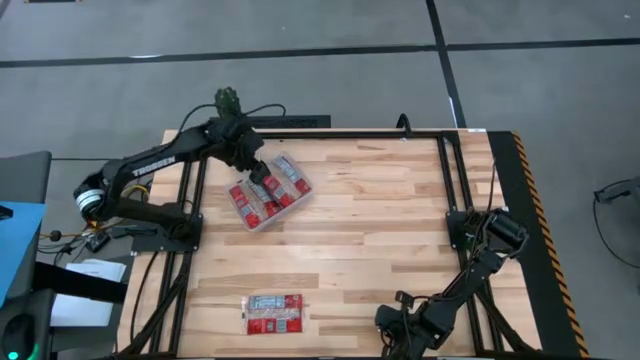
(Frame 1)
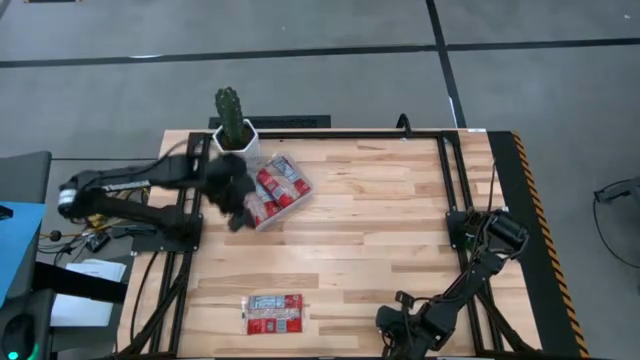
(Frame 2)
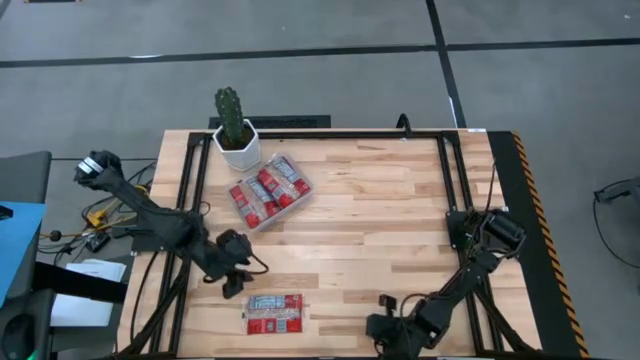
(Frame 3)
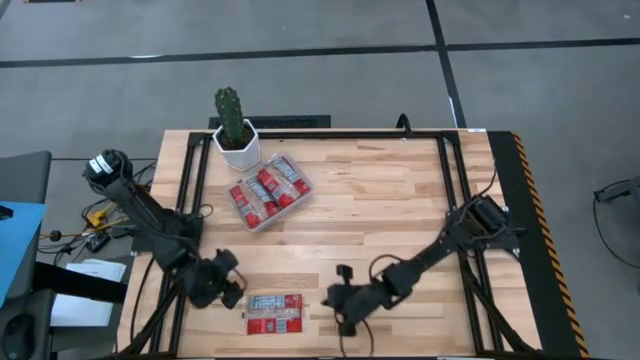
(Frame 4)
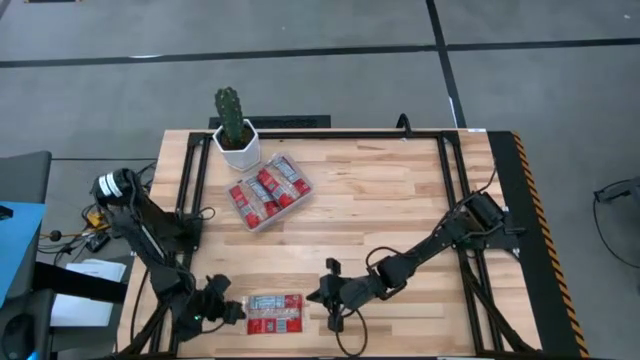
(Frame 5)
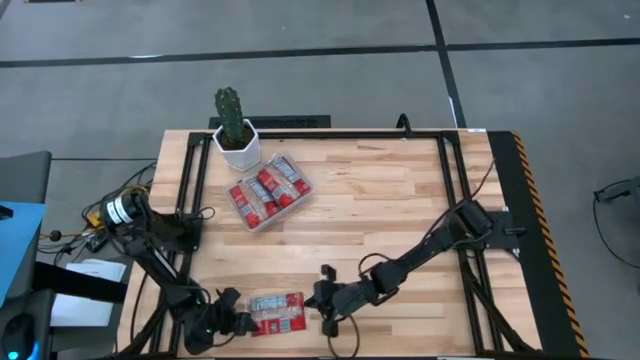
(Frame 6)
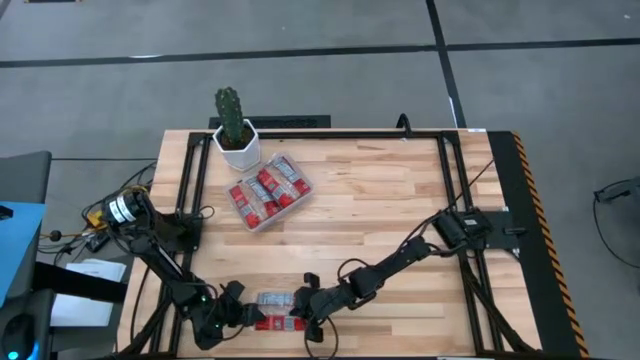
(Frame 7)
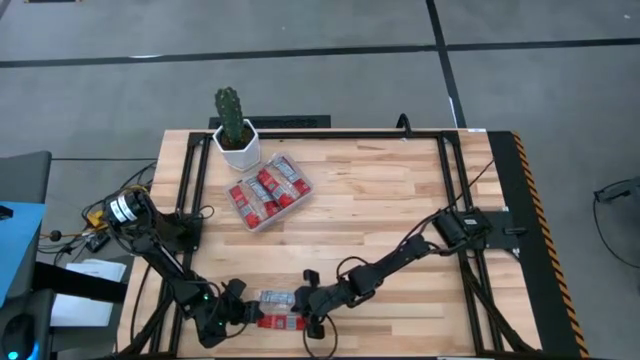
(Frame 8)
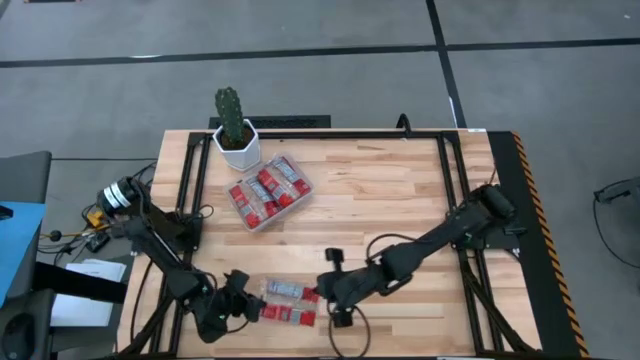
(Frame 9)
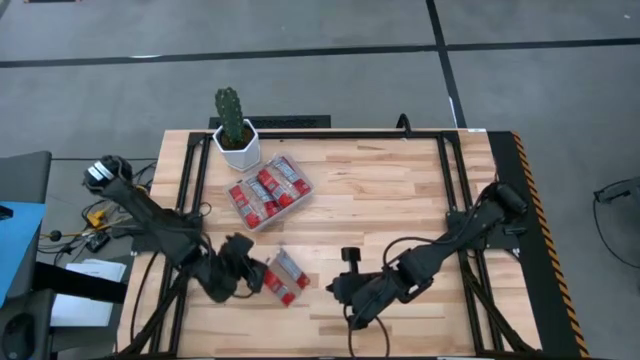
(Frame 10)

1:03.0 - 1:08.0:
Task: Sort popcorn bags into baskets
Put the red popcorn bag into the transparent bin

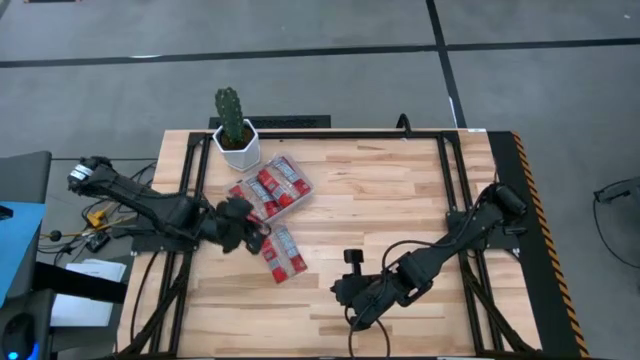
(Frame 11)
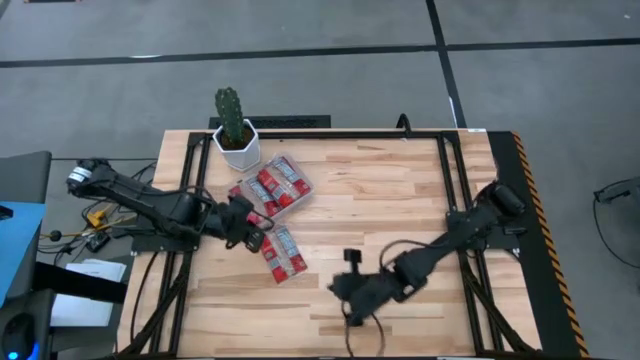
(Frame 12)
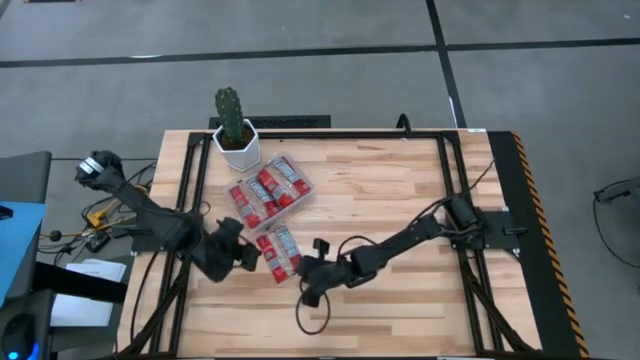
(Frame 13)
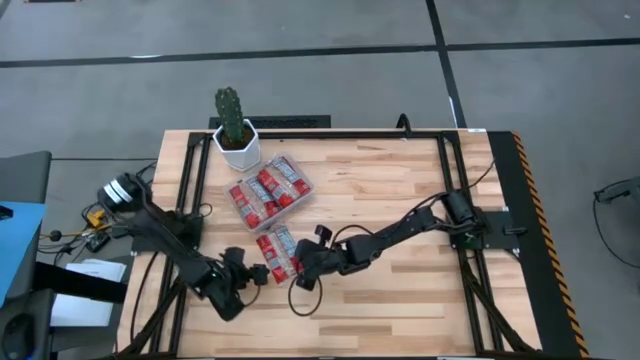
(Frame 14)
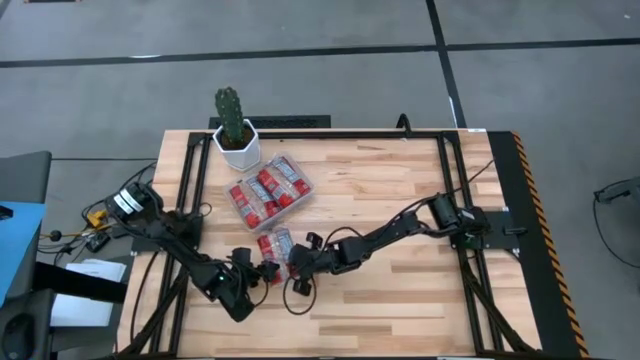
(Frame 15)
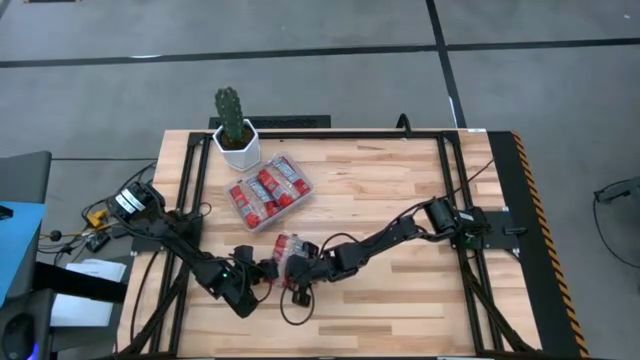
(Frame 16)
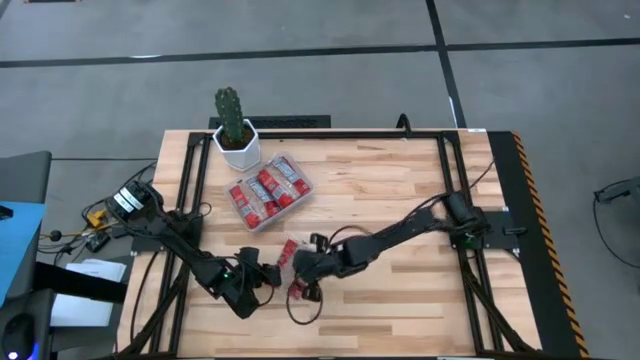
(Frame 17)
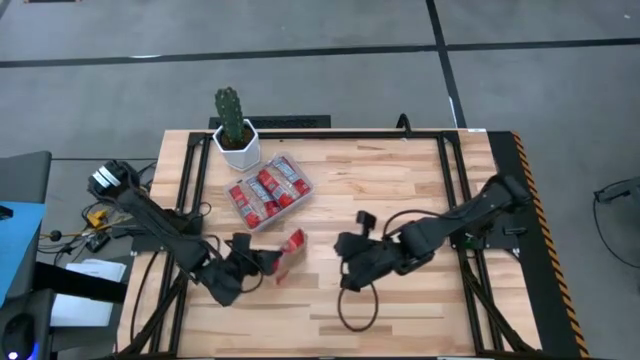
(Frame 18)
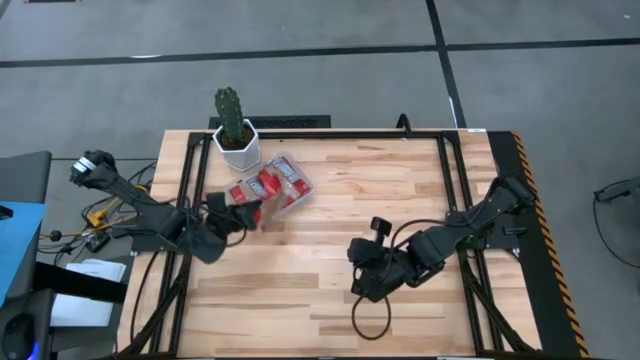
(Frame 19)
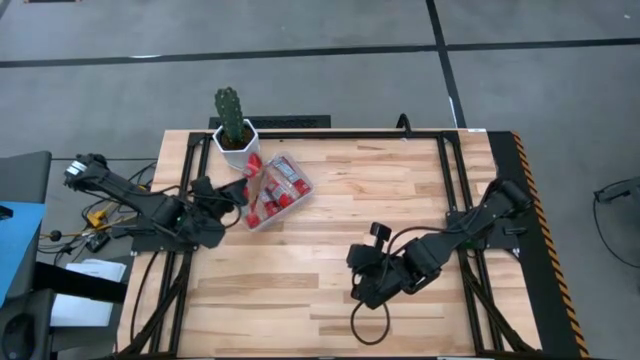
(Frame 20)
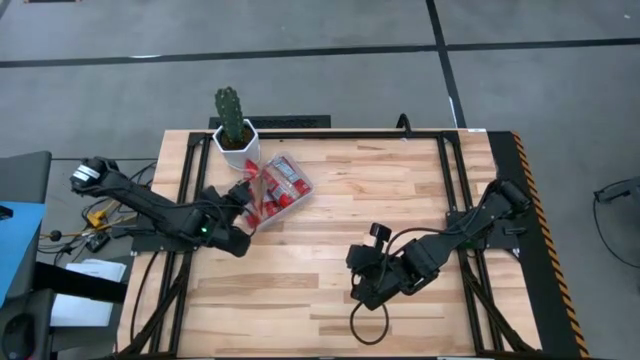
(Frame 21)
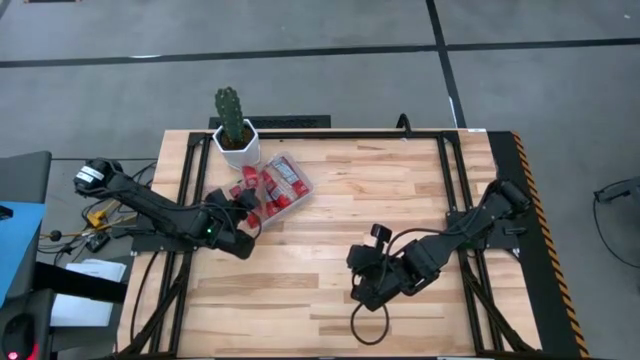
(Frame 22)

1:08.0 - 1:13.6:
Put the red popcorn bag into the transparent bin

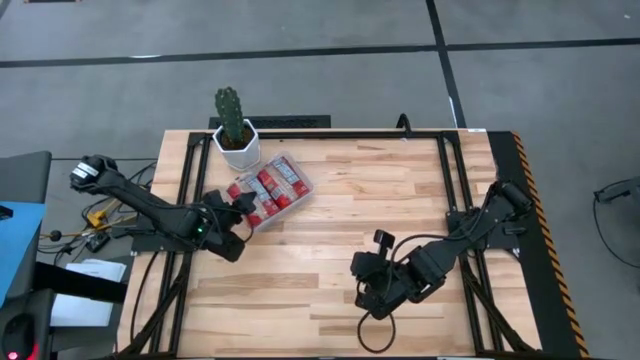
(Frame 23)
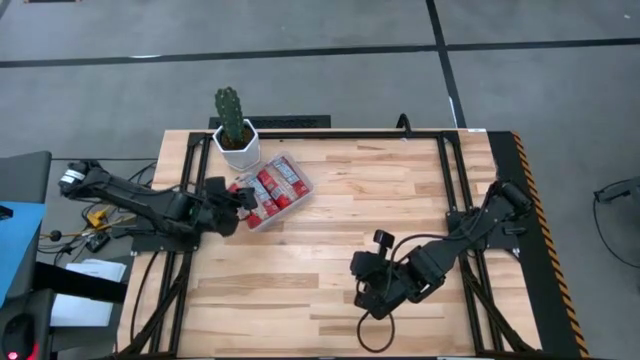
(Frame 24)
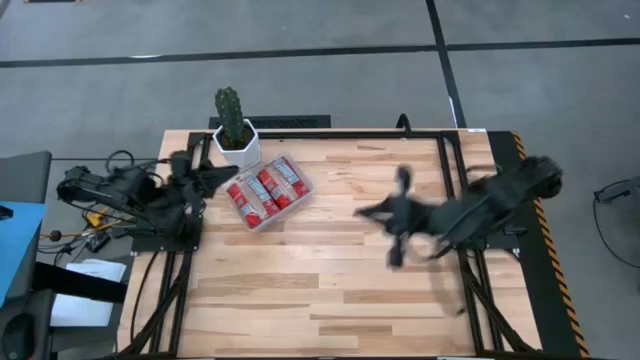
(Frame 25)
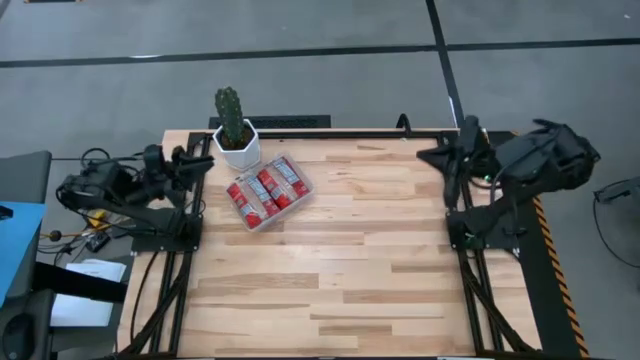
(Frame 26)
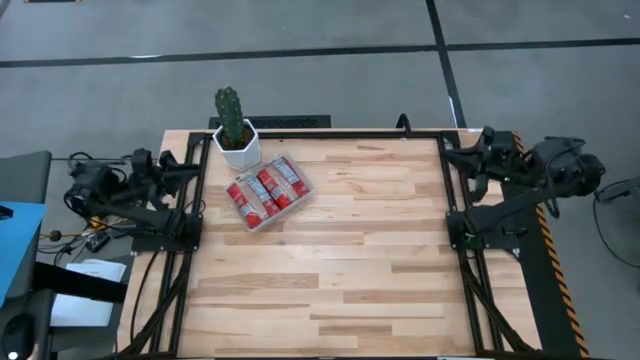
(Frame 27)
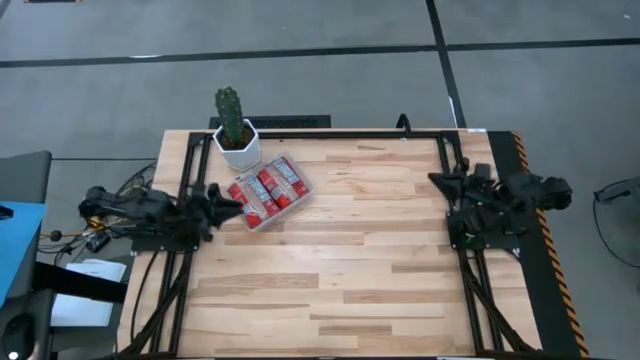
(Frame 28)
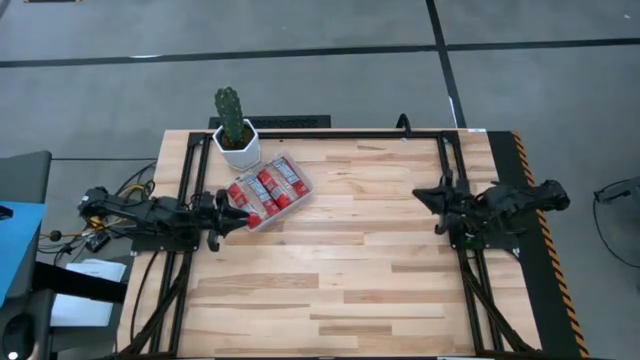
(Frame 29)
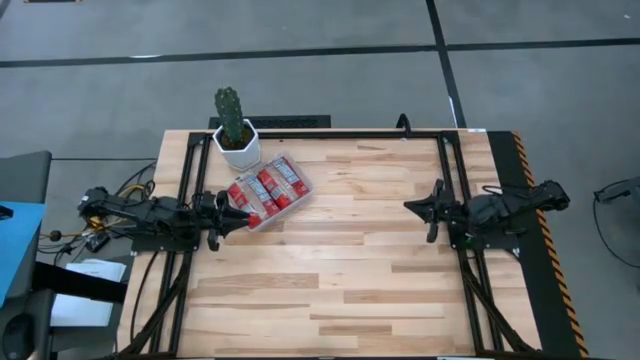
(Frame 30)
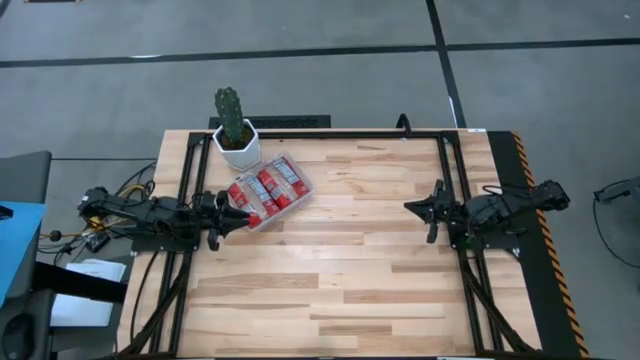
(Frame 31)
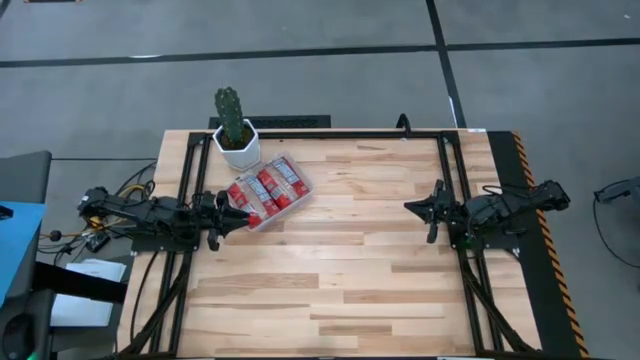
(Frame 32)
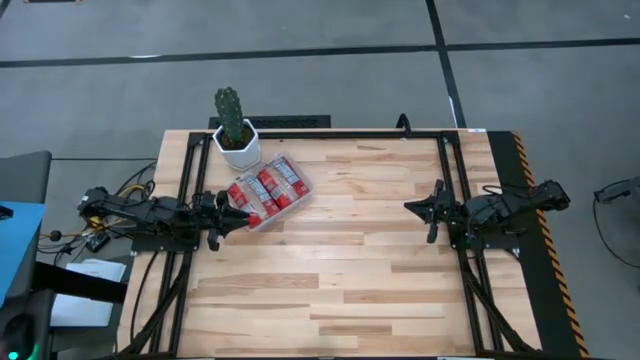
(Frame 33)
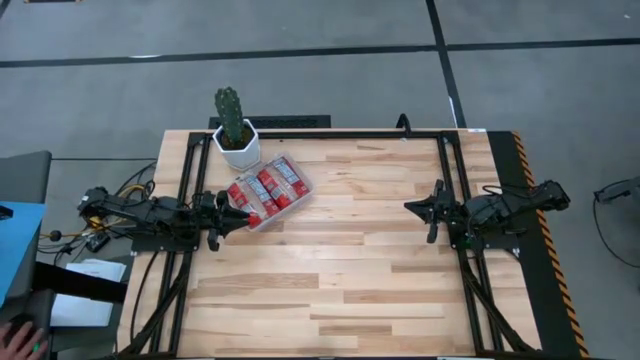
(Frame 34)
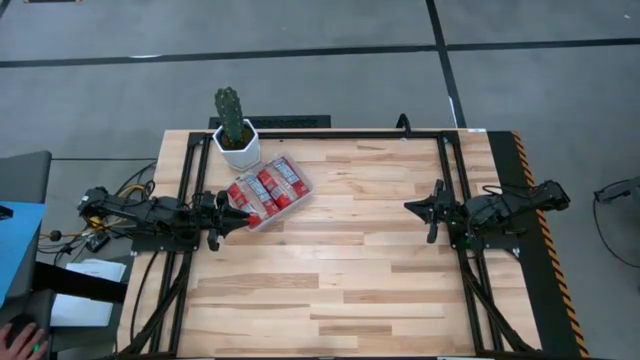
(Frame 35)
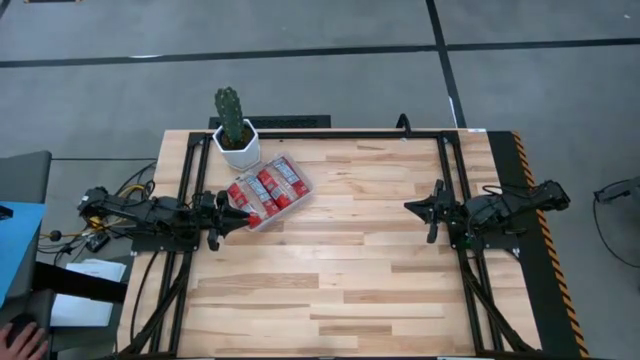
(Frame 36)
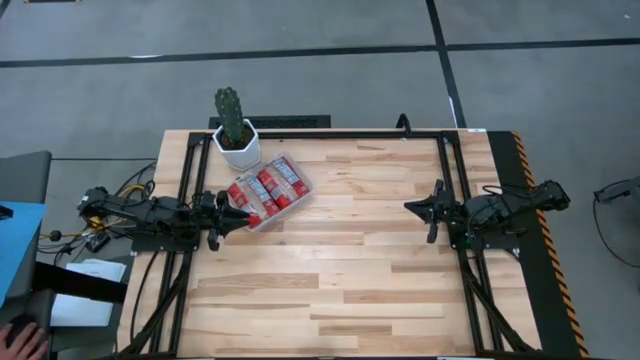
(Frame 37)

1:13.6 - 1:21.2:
Return to Home Position

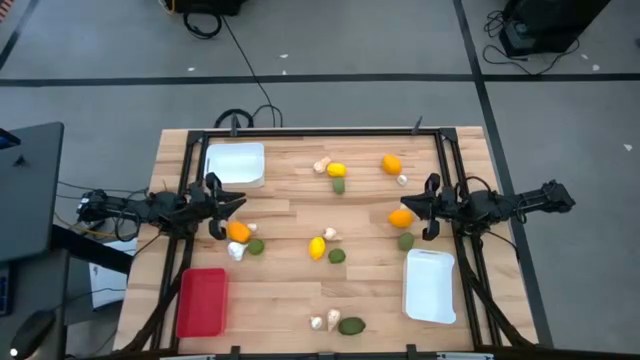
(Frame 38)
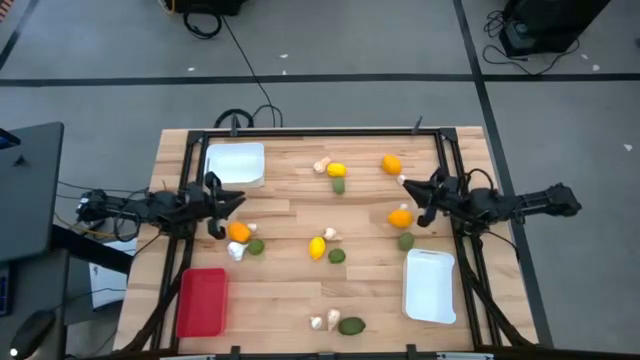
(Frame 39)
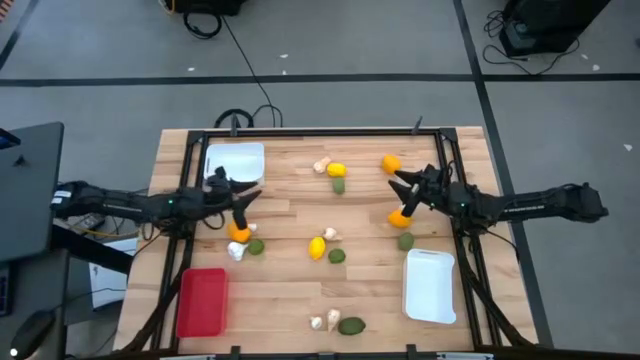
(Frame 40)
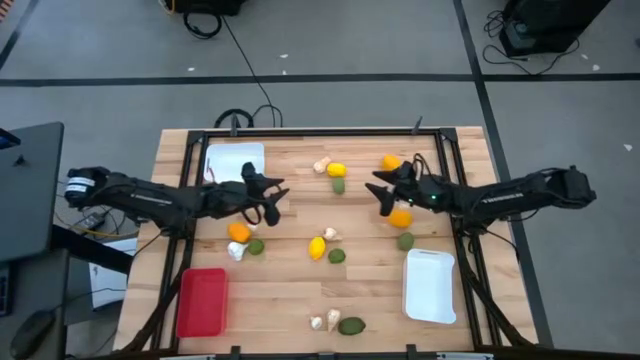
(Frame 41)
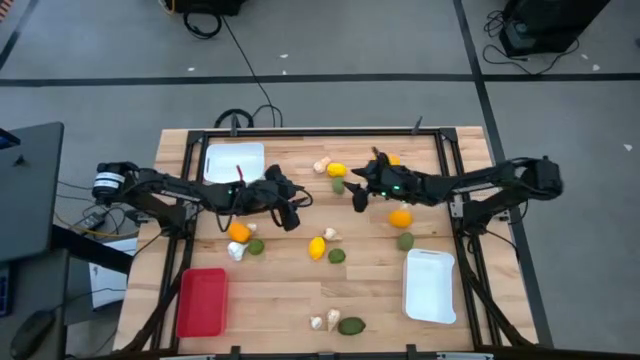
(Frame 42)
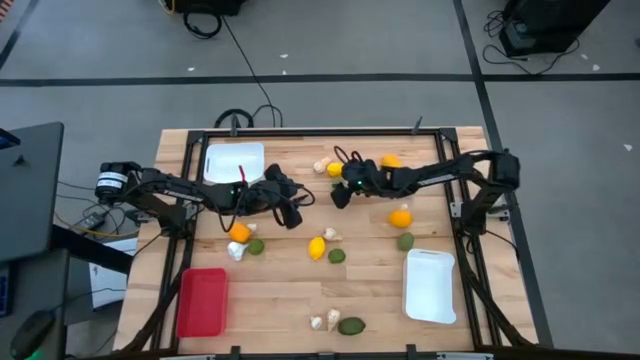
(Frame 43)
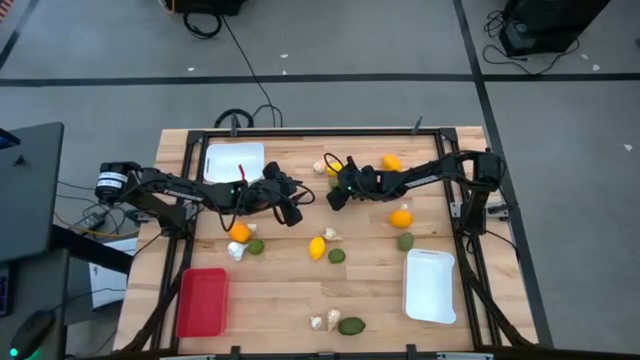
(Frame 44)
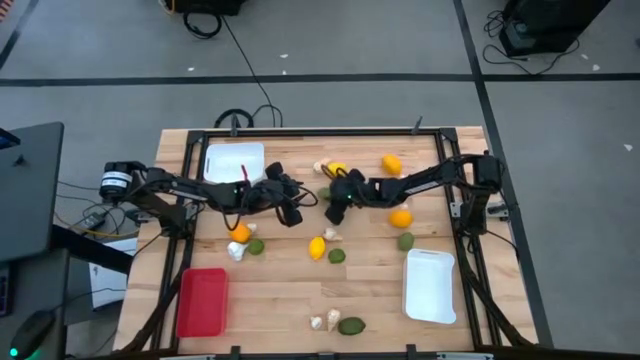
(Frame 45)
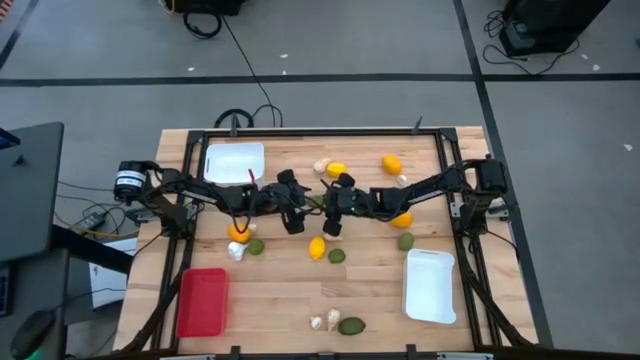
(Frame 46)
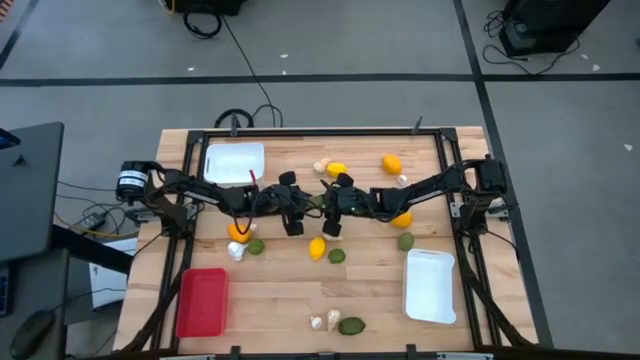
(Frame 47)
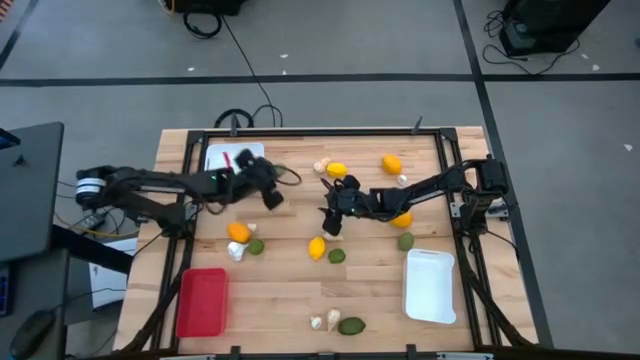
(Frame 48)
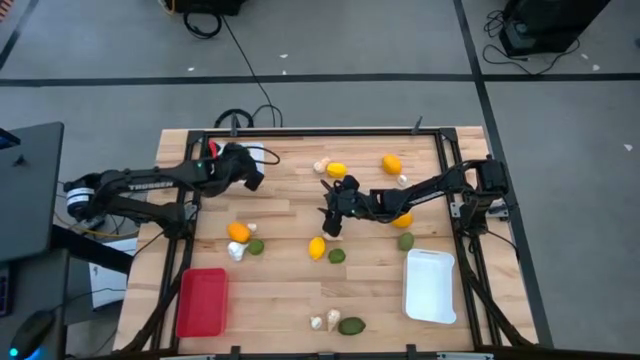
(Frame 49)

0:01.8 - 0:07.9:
Task: Sort produce into baskets
Put the top center green lime into the top white bin
